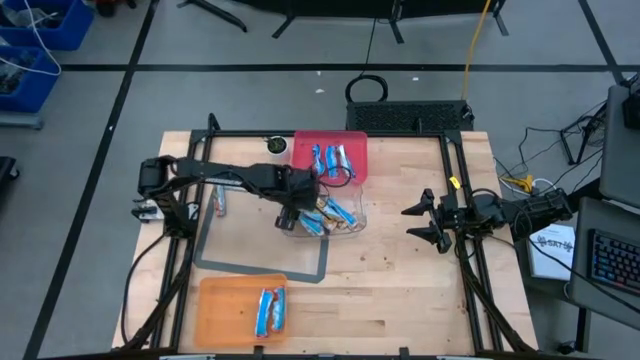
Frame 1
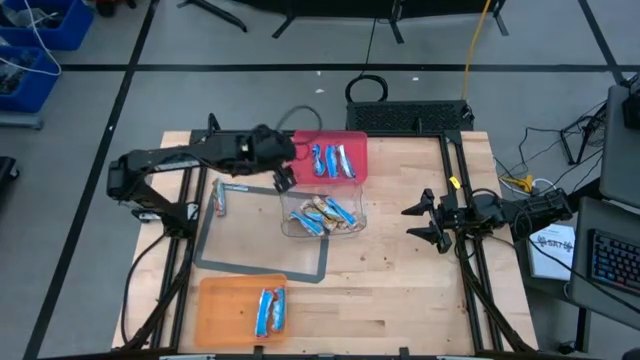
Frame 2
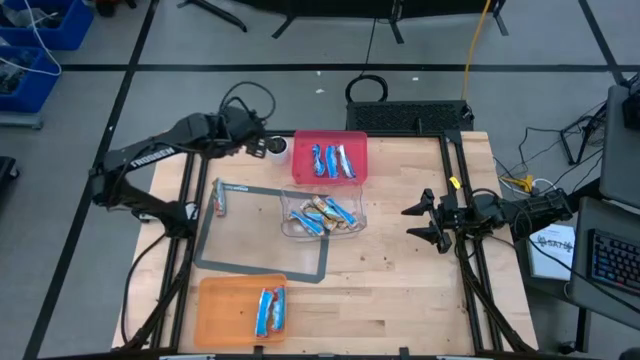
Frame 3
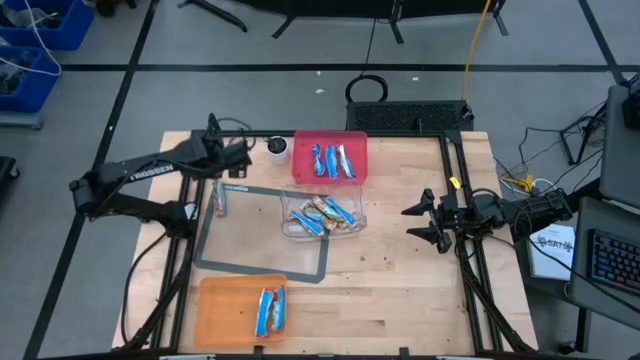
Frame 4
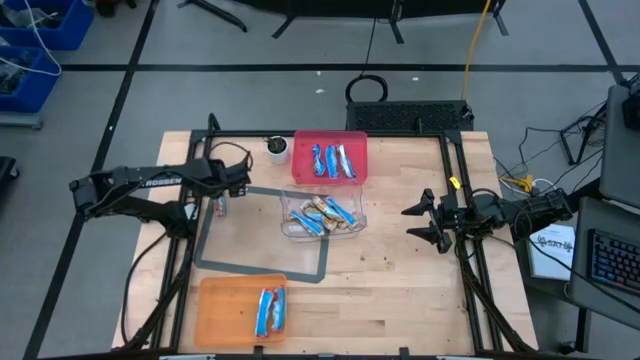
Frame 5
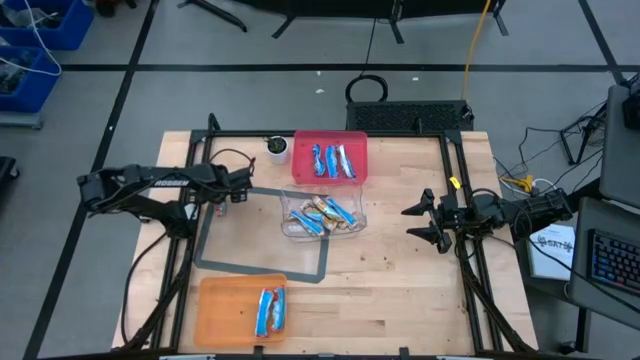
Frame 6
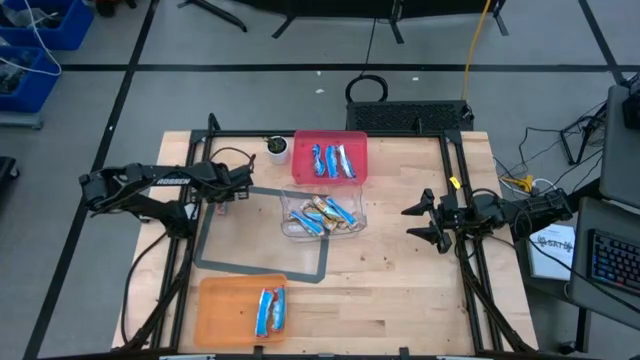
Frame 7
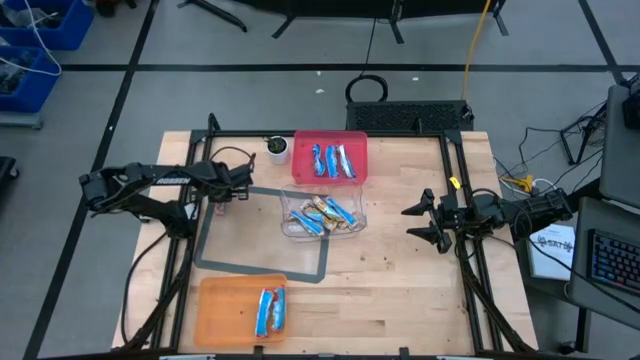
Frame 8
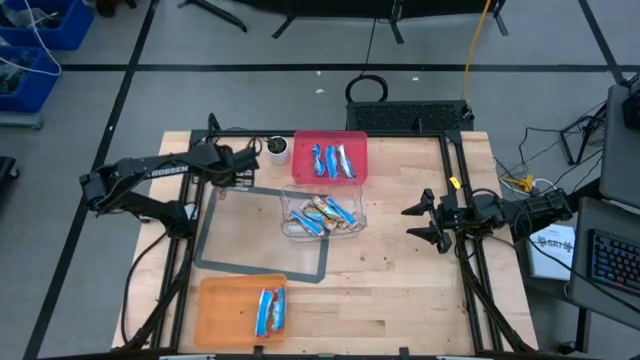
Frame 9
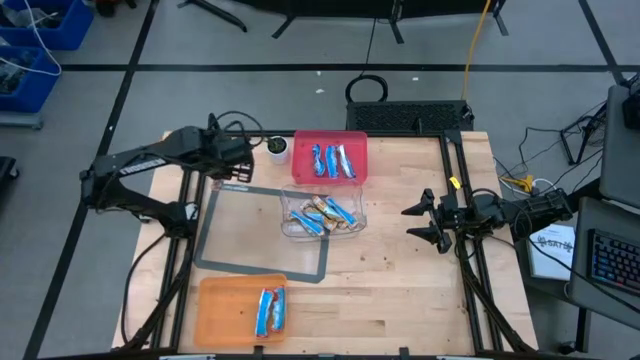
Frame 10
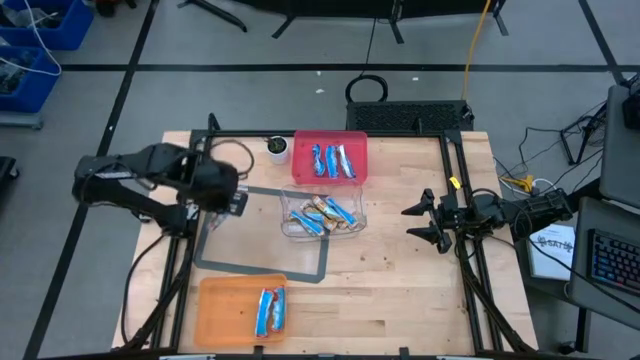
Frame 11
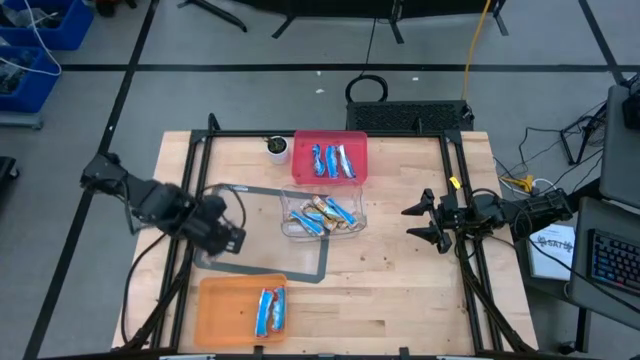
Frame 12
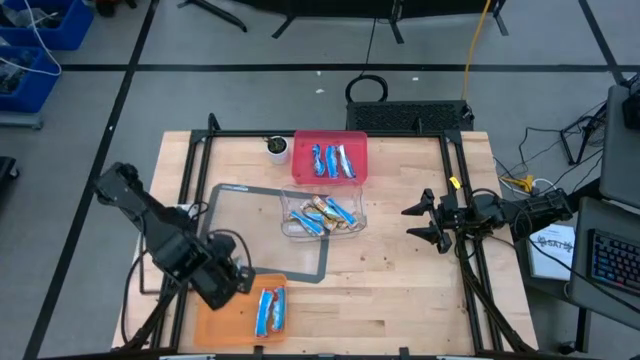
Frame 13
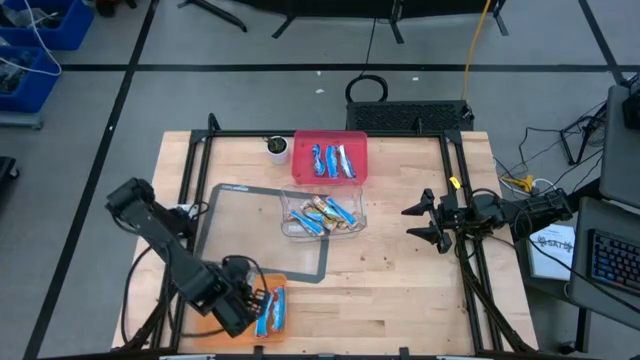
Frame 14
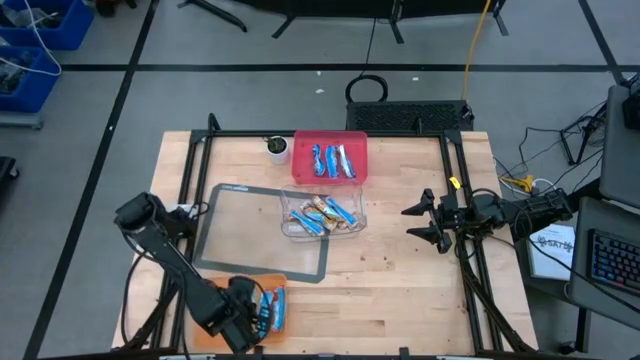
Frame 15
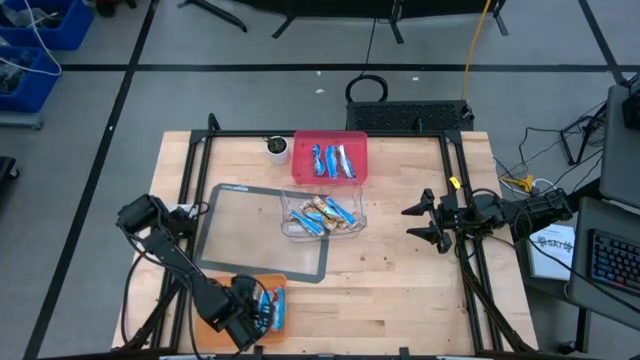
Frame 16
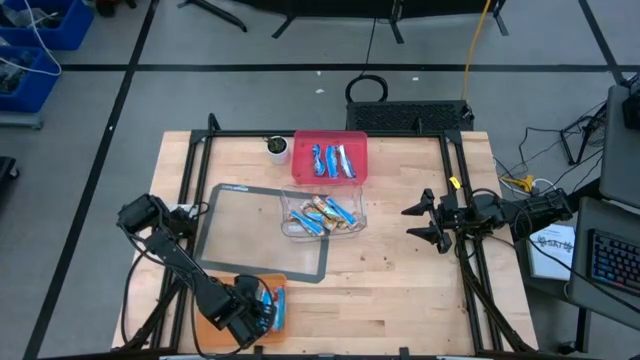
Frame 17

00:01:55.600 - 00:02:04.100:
Task: Pick and place Granola Bars by type
Put the red granola bar into the orange bin

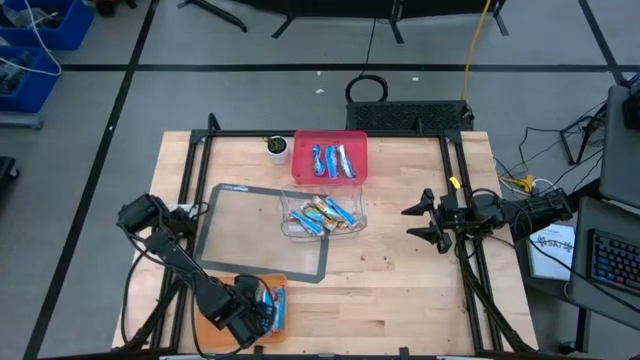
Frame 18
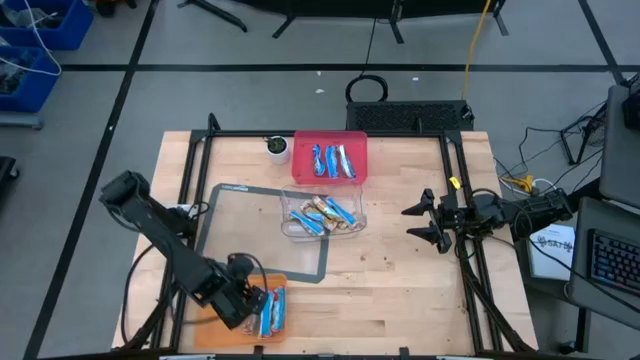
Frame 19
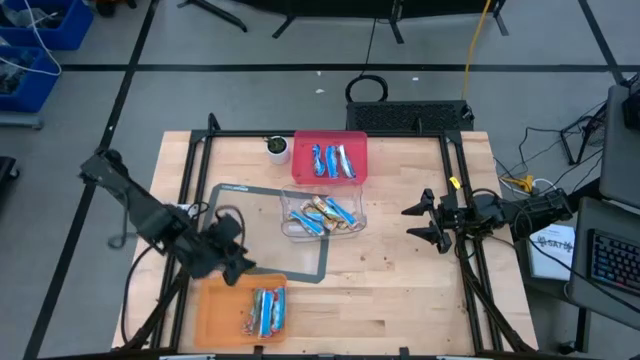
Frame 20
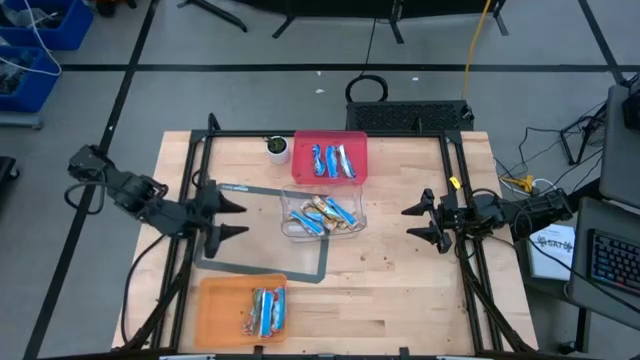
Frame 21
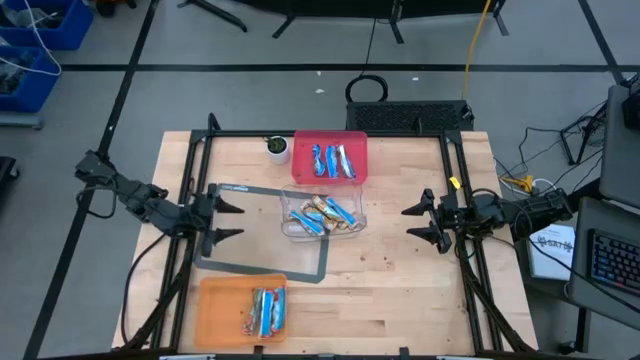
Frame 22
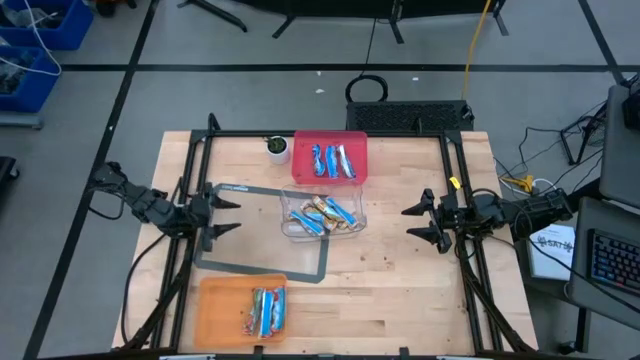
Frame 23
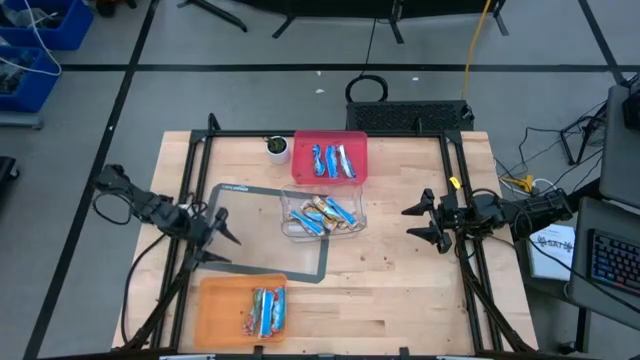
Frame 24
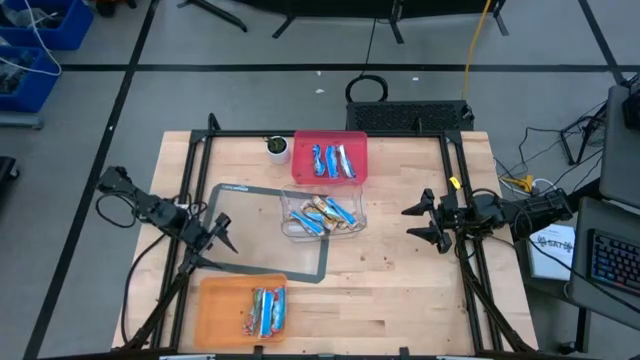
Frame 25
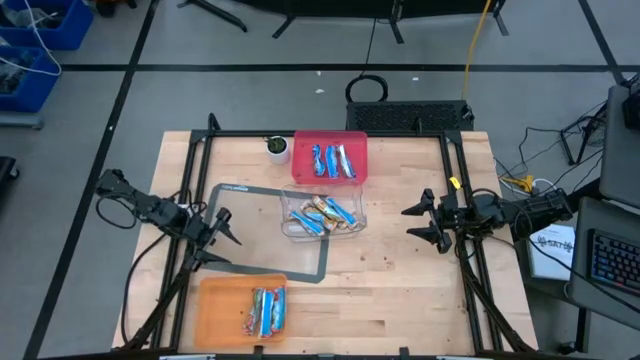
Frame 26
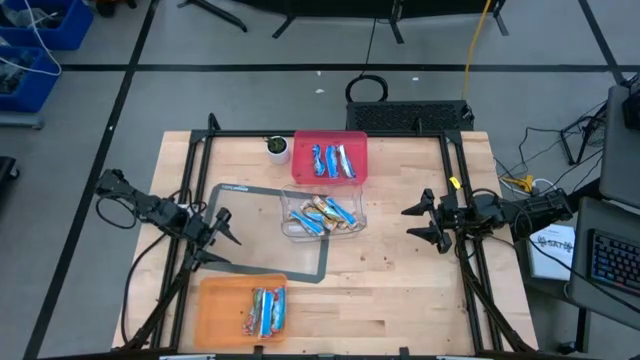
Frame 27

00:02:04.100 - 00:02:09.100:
Return to Home Position

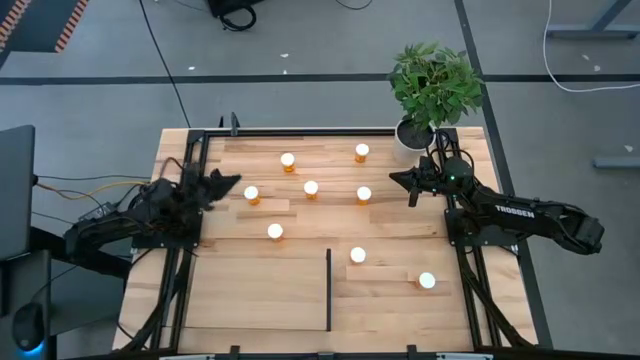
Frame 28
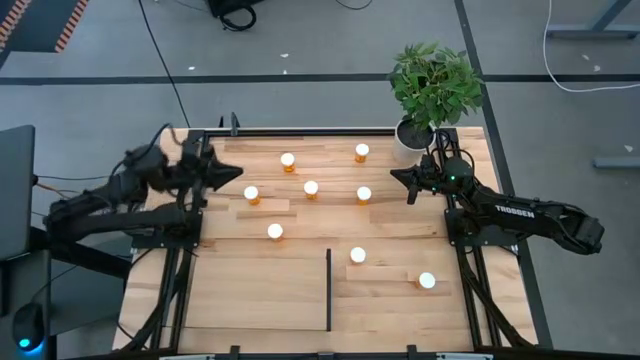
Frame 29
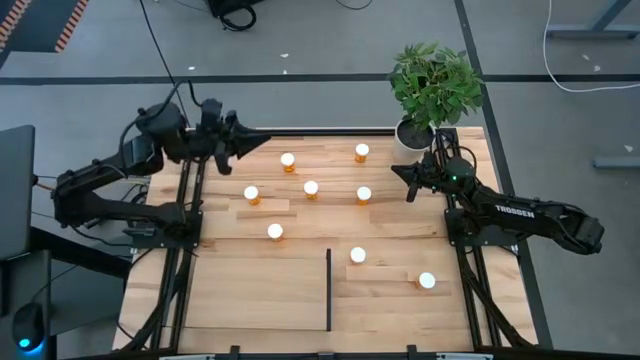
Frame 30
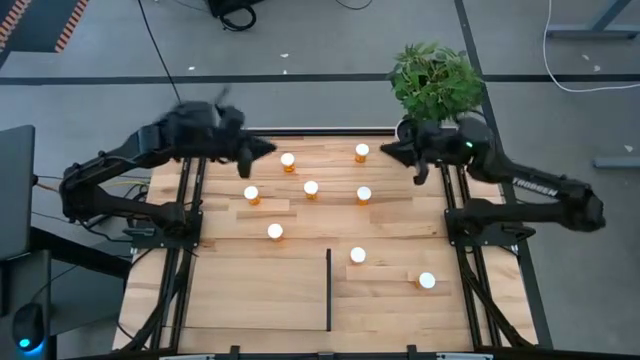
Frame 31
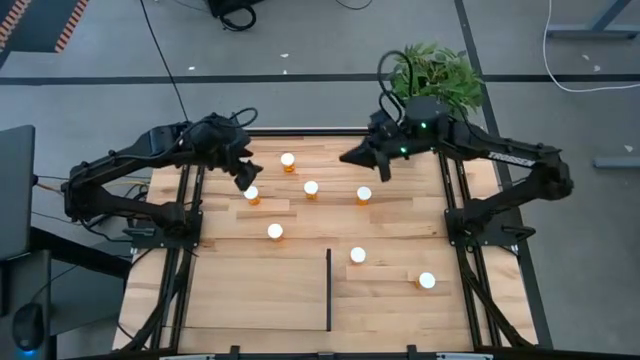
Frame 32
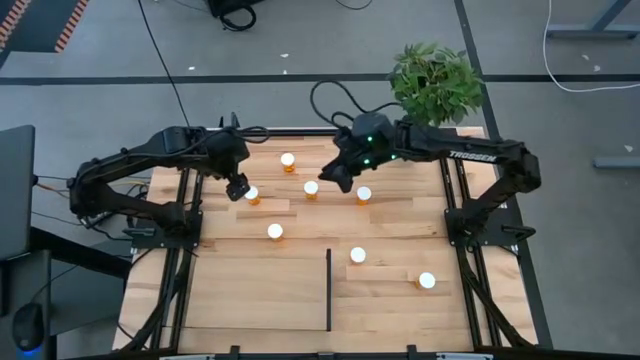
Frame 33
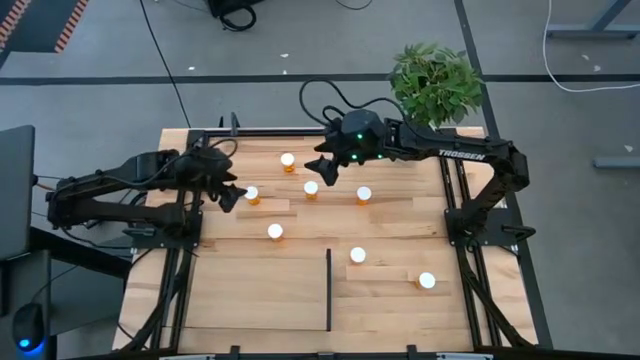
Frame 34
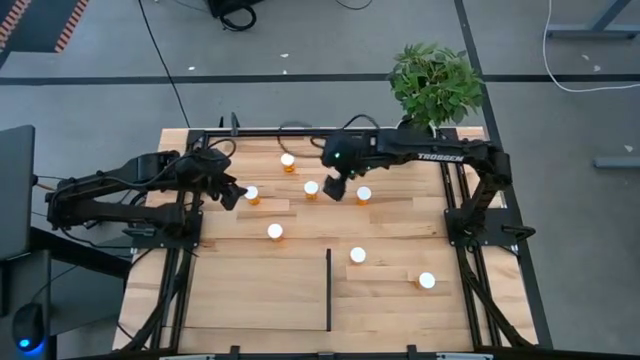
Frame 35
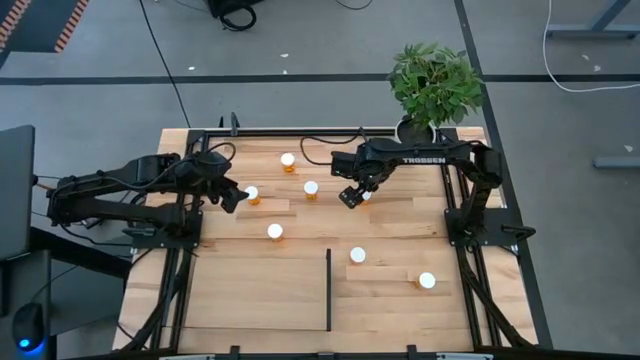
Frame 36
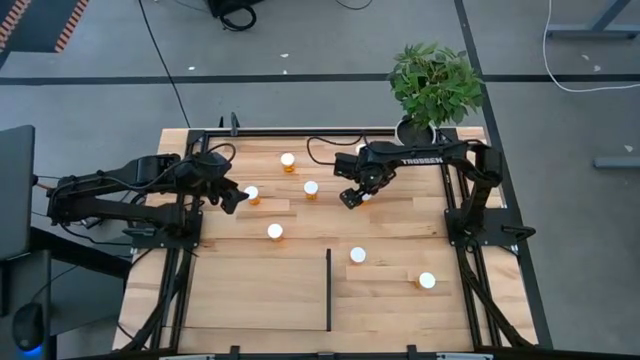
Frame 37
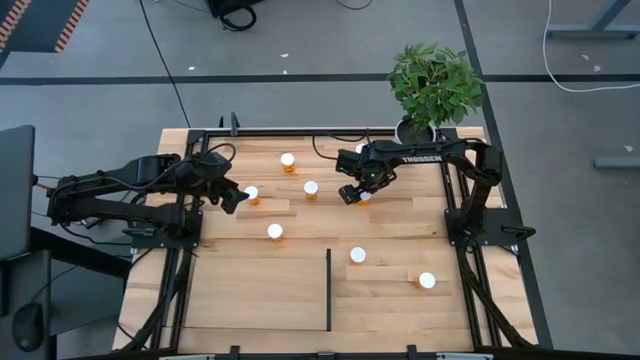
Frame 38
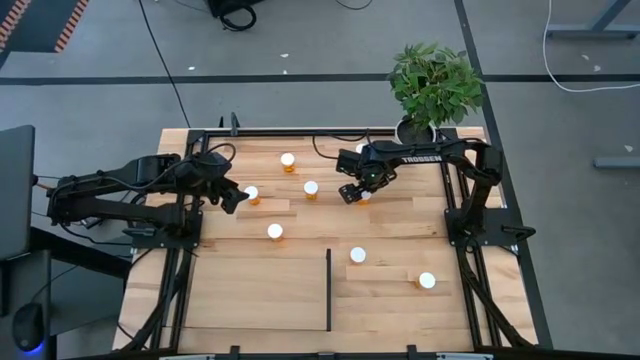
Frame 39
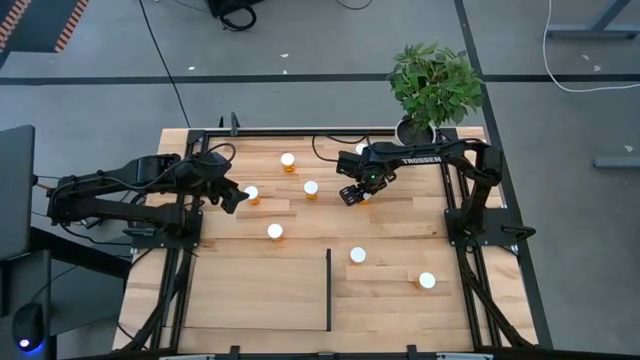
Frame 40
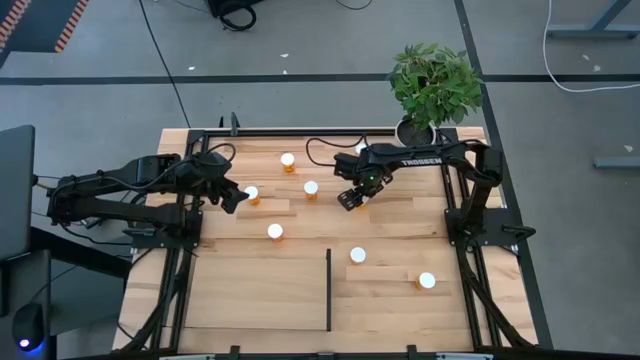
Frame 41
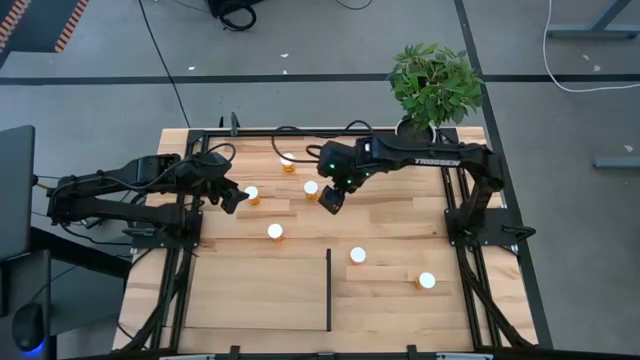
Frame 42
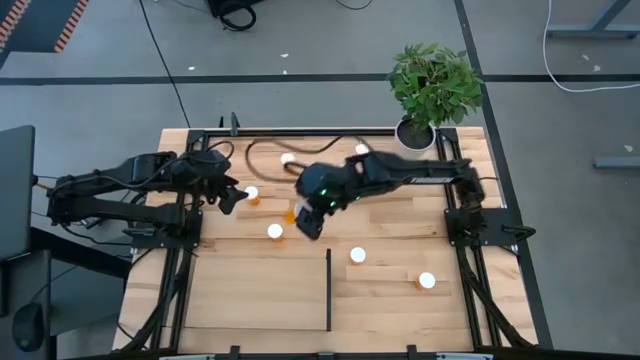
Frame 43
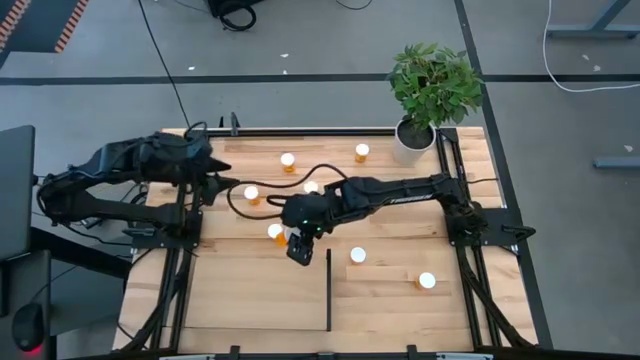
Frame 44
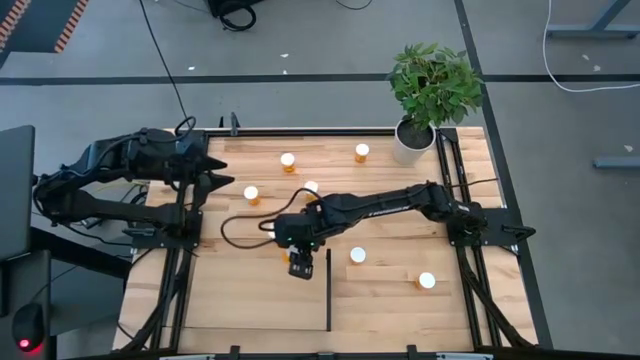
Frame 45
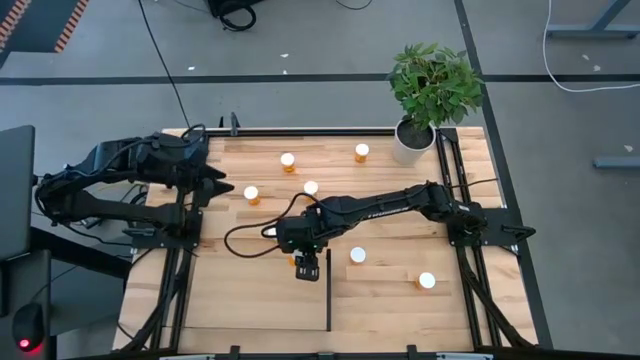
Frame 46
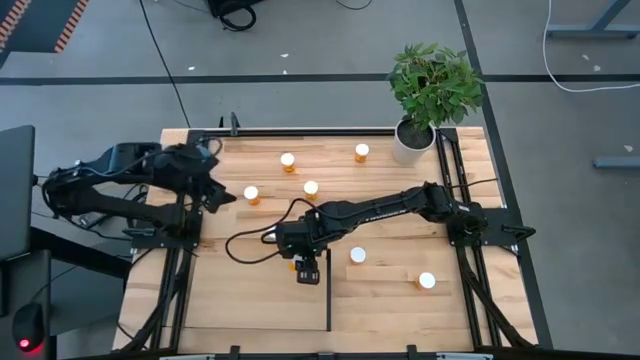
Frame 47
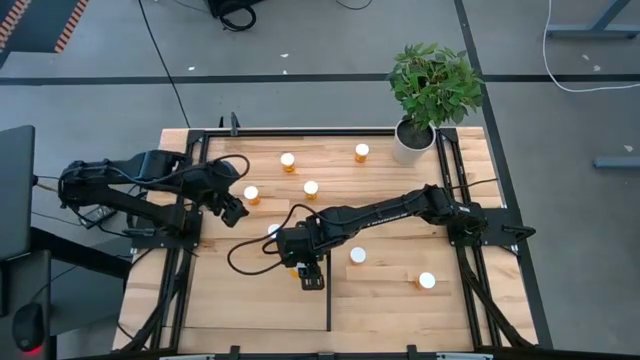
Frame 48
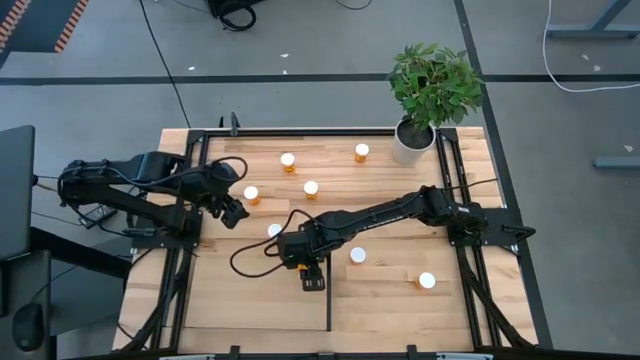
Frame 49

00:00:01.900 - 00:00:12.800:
Task: Pick and place medicine bottles onto shelf by color
Put the orange pill bottle on the shelf
